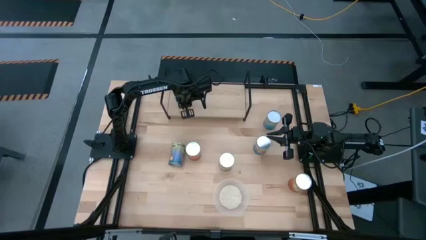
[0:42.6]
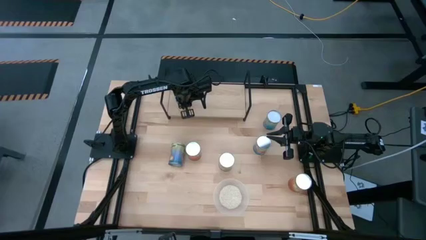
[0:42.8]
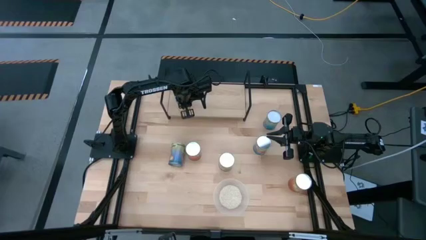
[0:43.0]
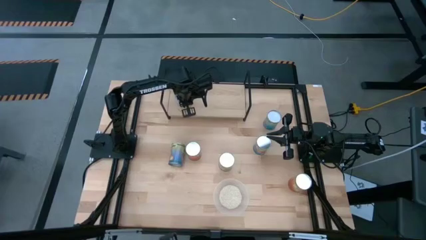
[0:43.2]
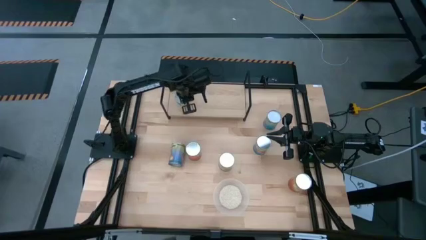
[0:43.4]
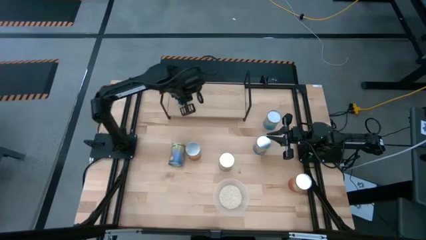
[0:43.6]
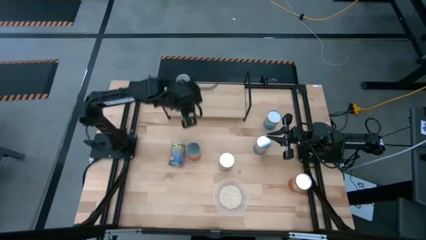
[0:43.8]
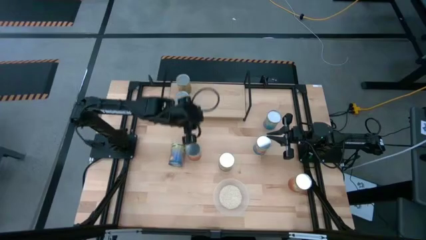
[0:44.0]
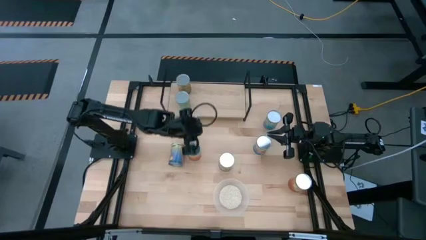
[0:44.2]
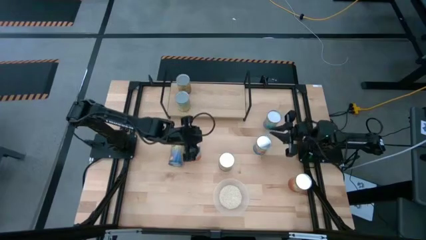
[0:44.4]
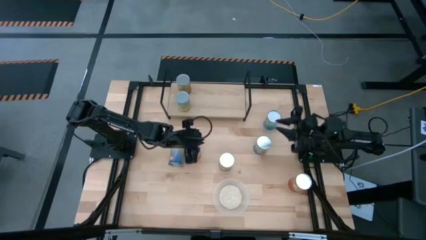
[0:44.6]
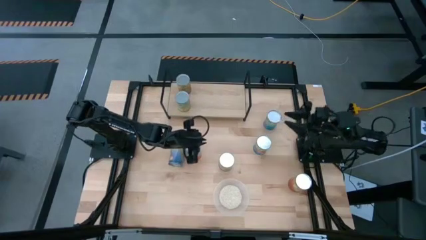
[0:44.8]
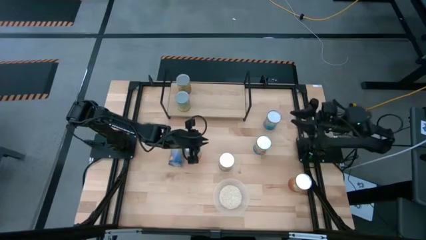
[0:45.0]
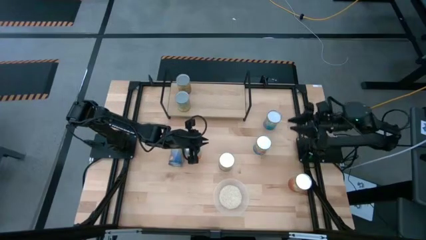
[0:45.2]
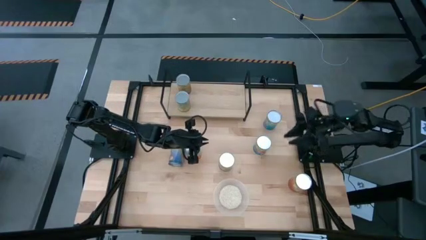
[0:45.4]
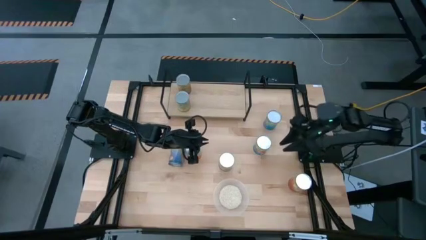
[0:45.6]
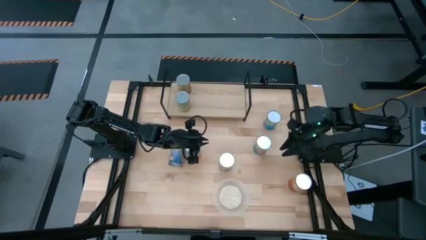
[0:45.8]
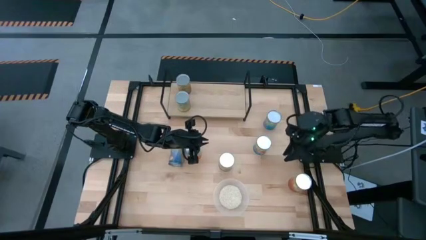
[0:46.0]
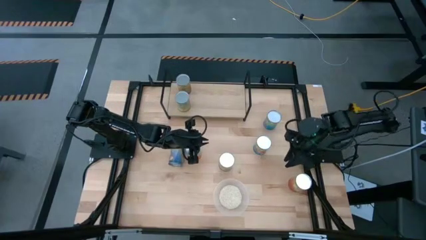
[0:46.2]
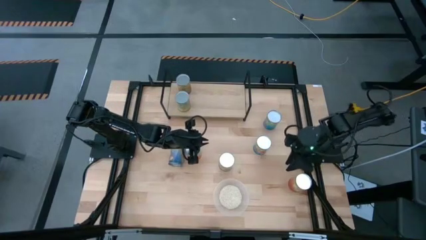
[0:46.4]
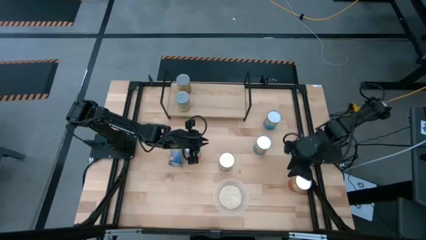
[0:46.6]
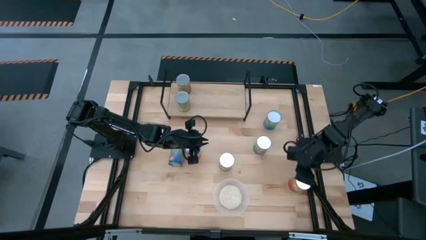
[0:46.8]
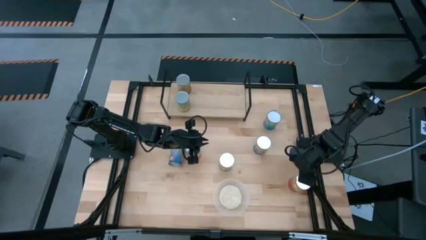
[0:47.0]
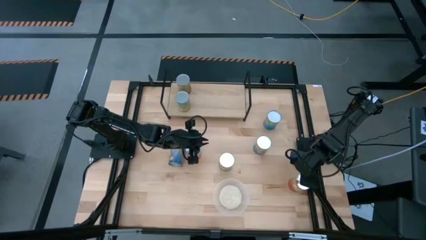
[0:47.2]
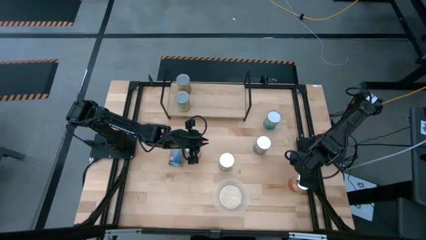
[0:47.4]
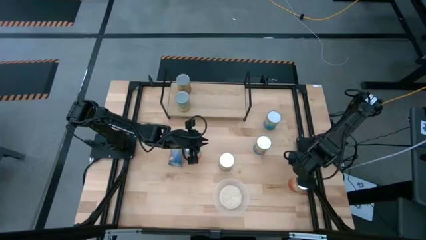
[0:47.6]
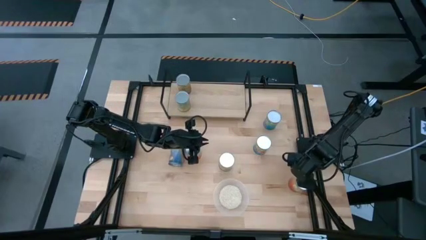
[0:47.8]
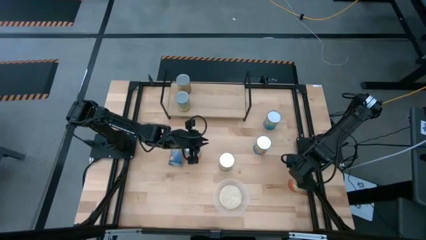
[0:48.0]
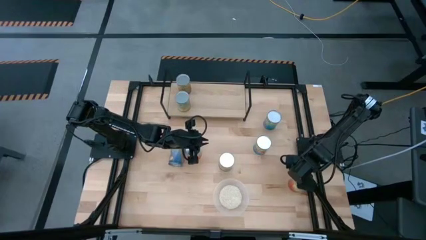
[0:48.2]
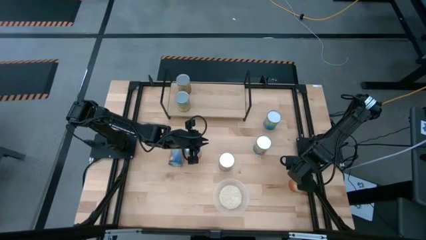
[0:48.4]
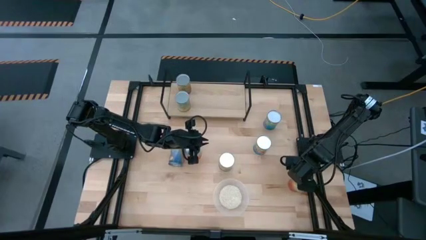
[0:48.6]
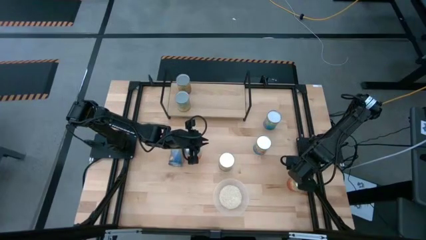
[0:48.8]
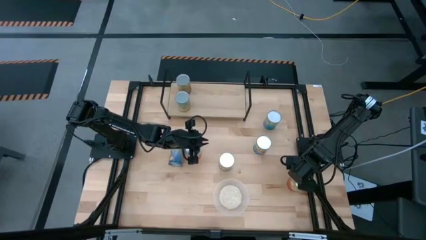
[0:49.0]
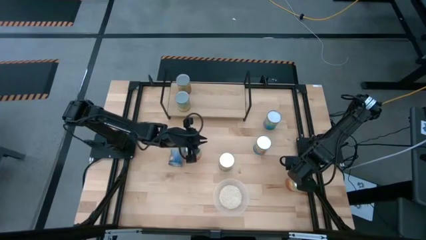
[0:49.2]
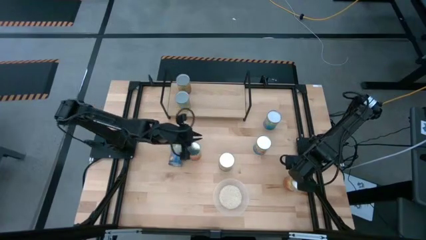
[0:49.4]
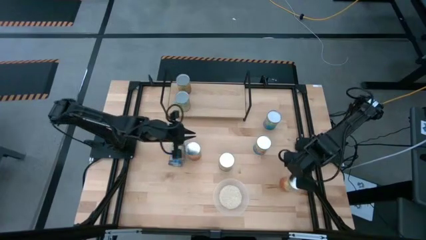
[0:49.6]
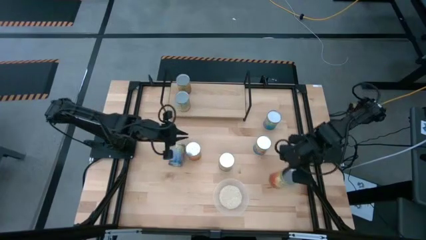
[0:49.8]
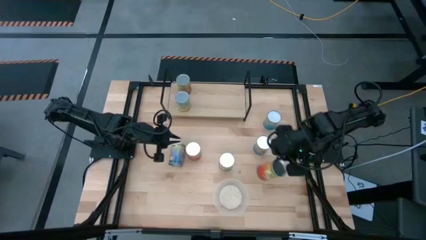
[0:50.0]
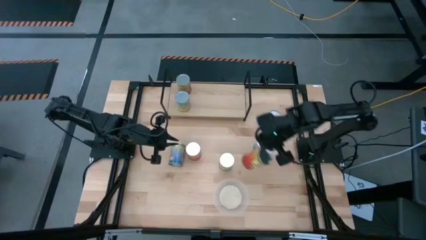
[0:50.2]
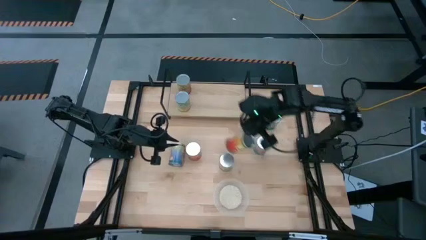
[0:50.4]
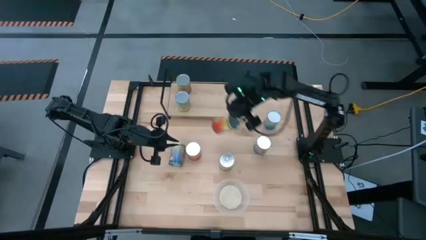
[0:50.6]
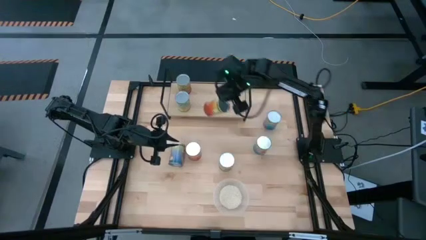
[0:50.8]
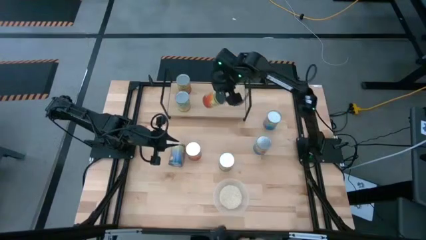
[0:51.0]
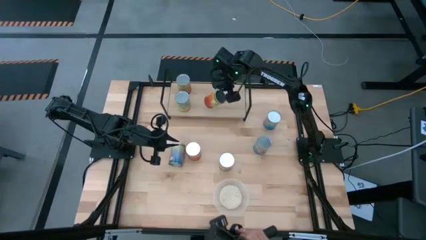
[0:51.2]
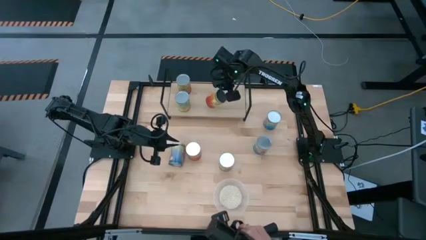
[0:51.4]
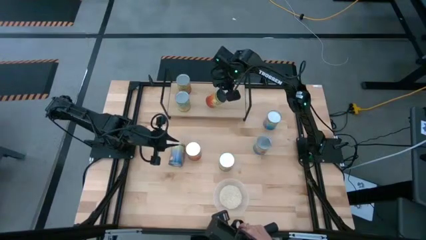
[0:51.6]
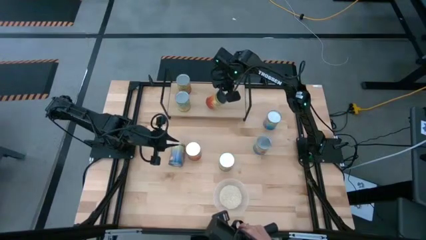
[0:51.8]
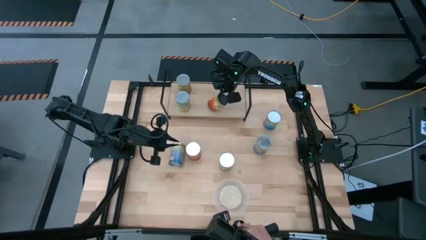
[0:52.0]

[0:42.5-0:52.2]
Task: Pick and place cans onto a shelf
Put the canned corn on the shelf

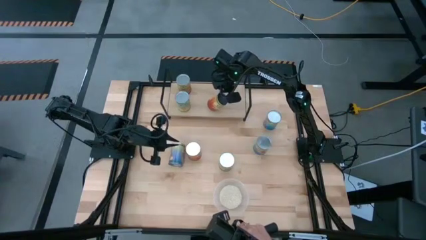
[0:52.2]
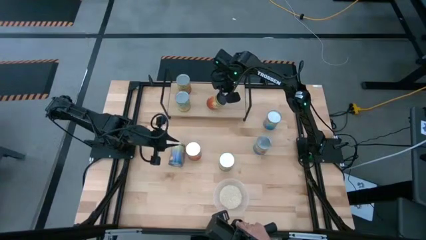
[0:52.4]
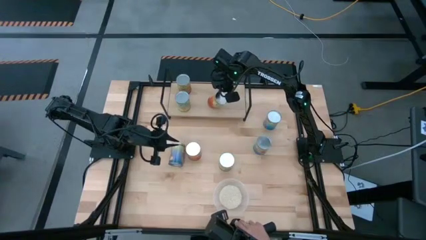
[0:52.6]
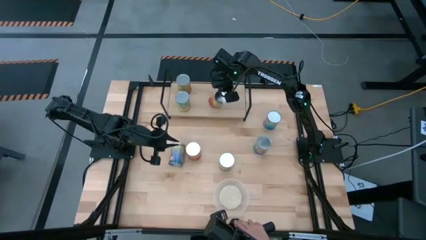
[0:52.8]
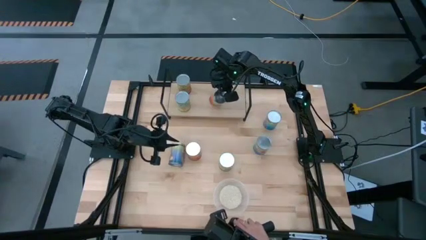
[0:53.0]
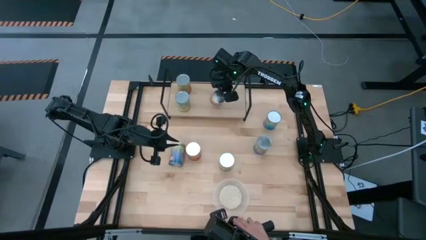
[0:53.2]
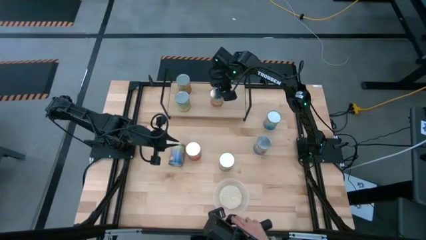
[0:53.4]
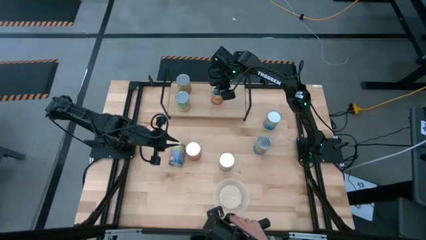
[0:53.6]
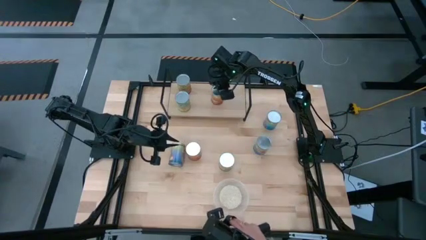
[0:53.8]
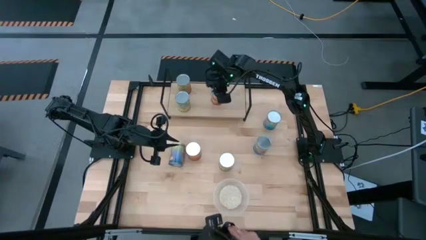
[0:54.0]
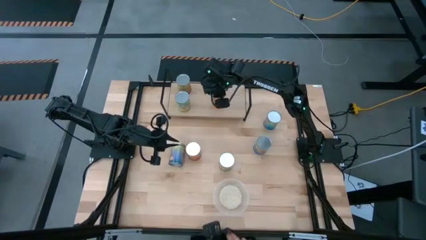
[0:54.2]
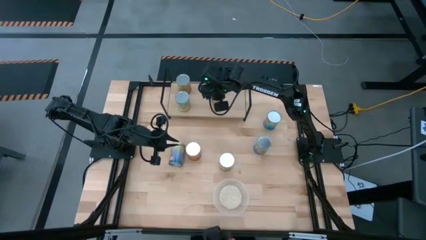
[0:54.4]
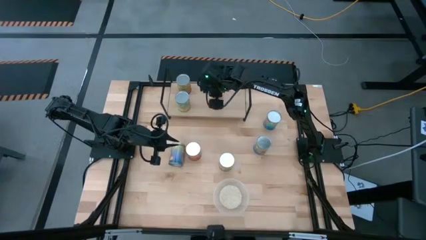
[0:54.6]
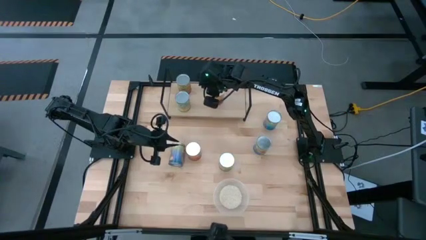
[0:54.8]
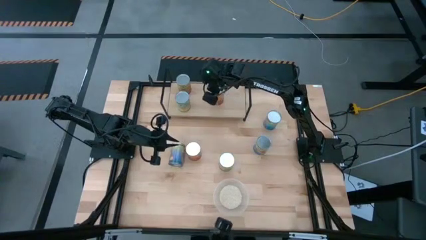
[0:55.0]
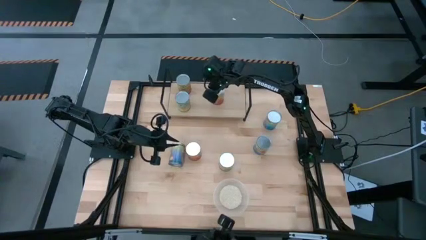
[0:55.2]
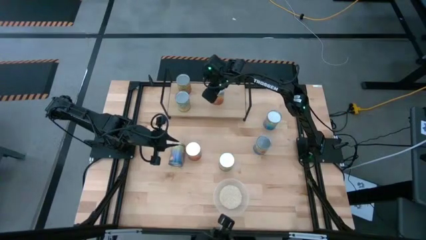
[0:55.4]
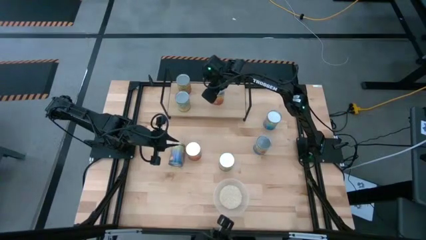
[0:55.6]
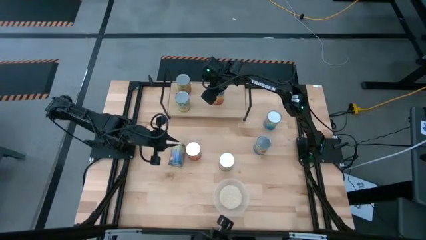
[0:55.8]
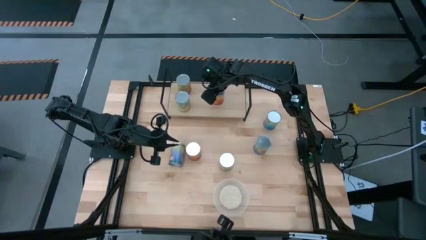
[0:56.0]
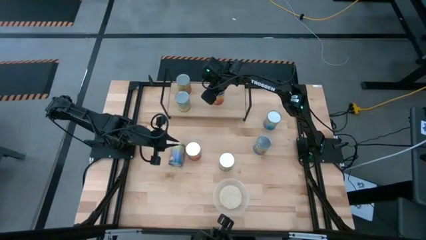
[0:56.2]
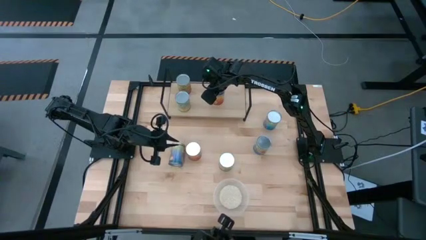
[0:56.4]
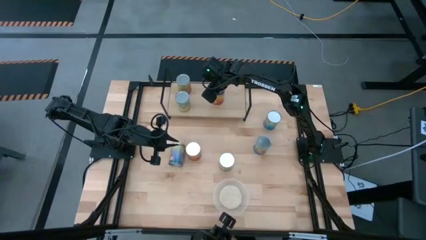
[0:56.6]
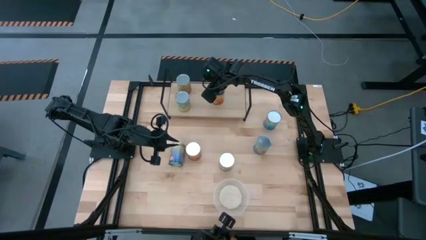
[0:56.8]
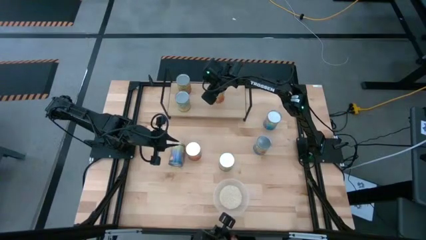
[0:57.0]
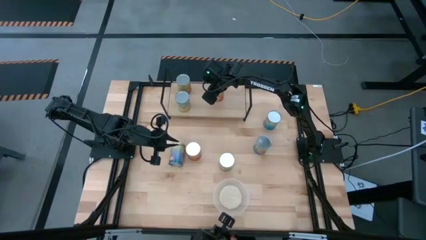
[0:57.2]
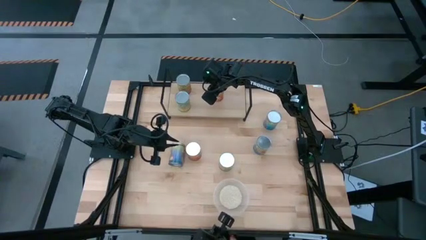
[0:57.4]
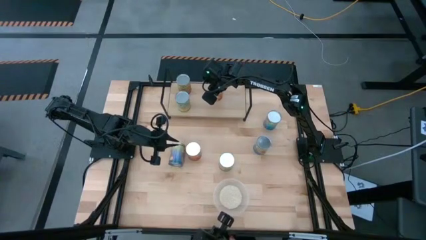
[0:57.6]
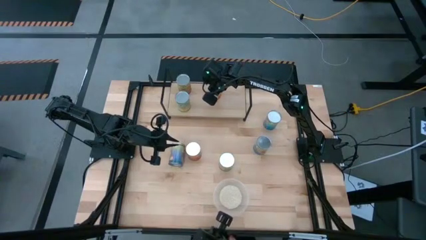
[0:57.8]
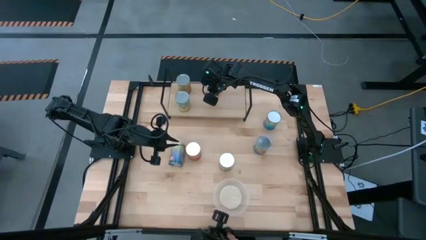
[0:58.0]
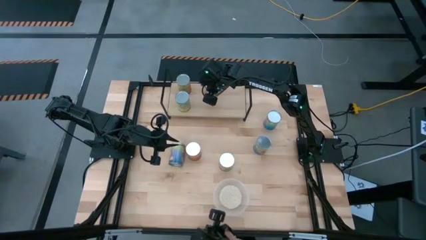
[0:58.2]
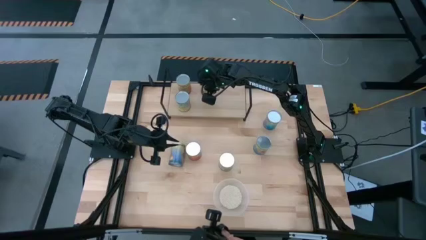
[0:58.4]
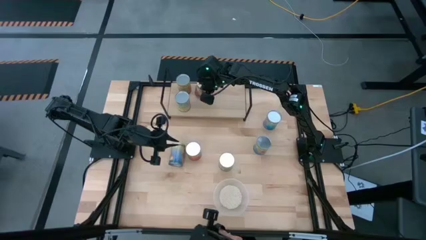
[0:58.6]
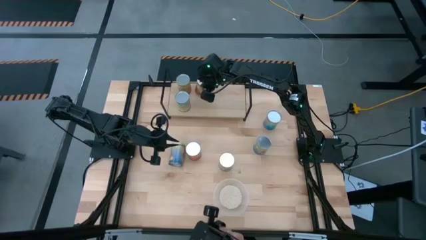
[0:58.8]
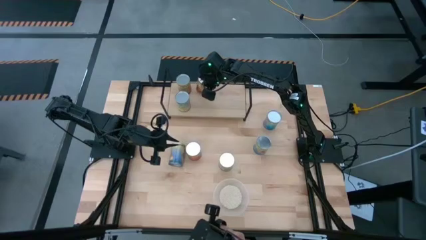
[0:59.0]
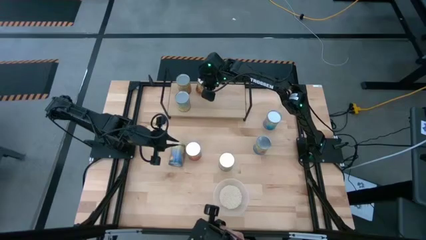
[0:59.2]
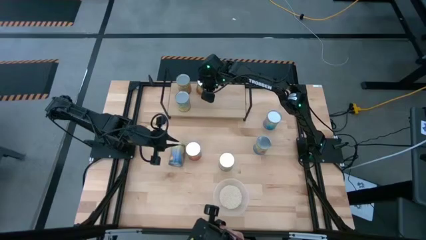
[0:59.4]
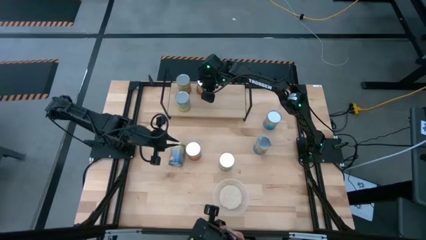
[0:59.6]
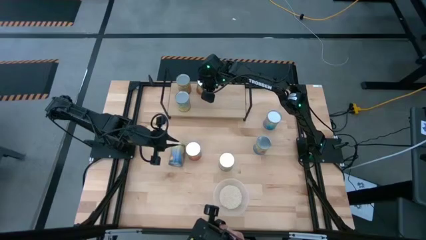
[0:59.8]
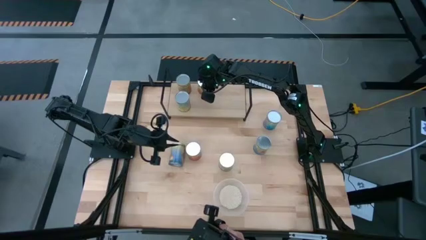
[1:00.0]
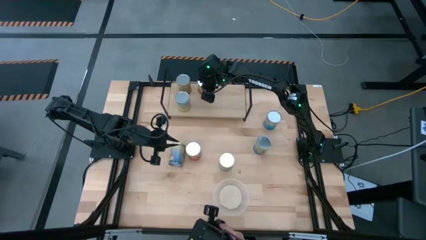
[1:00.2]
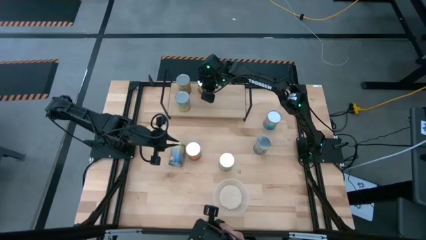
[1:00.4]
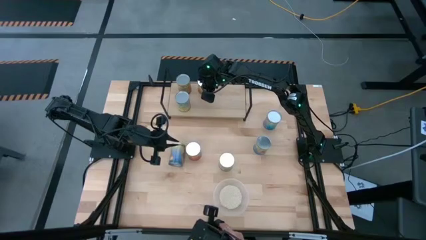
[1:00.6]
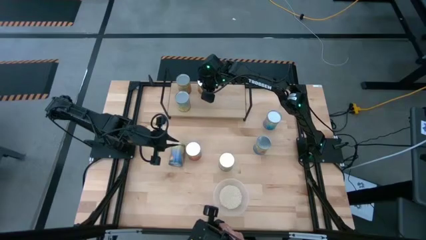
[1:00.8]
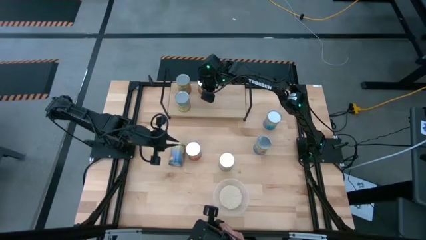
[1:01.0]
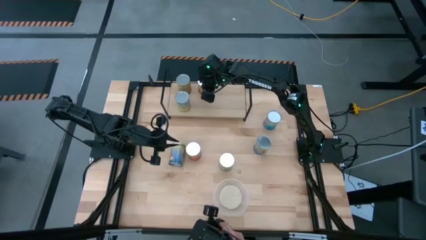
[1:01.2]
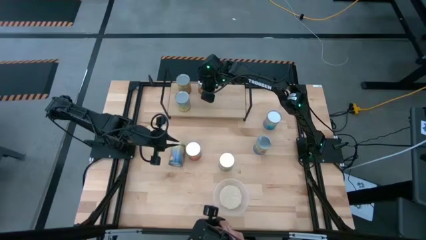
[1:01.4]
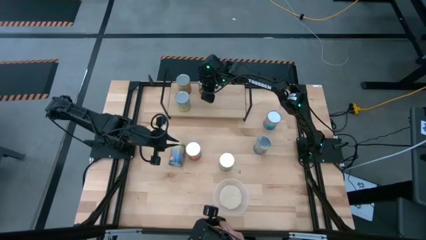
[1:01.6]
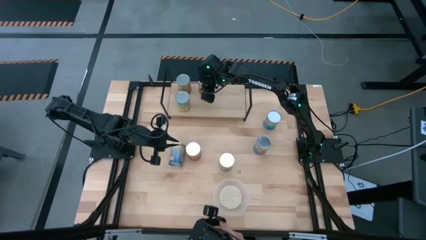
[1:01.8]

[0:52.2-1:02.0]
Put the canned corn on the shelf
